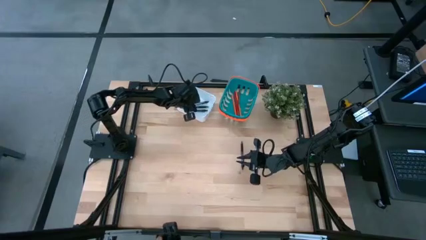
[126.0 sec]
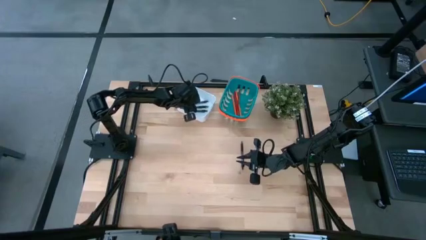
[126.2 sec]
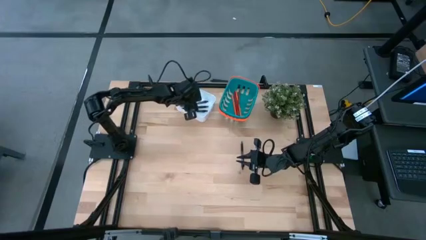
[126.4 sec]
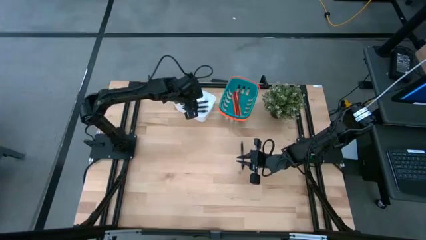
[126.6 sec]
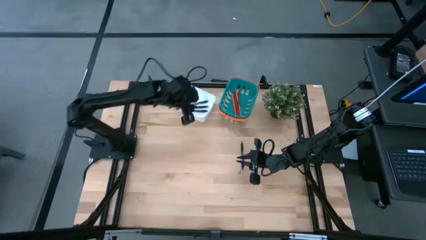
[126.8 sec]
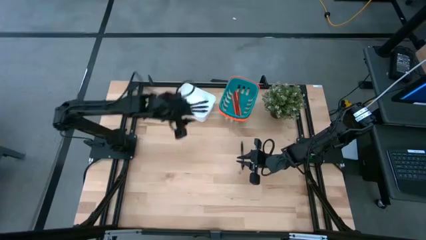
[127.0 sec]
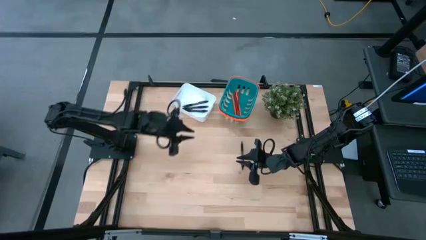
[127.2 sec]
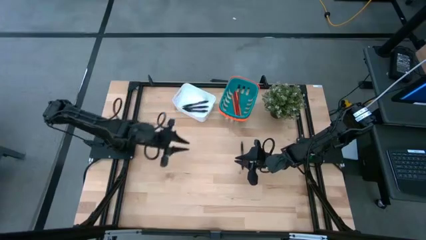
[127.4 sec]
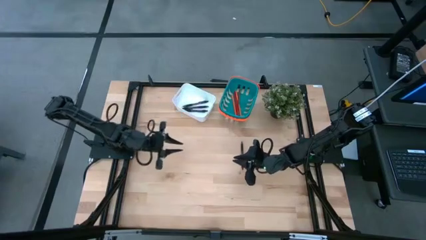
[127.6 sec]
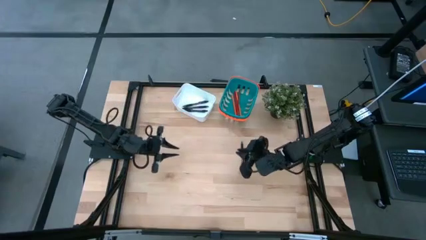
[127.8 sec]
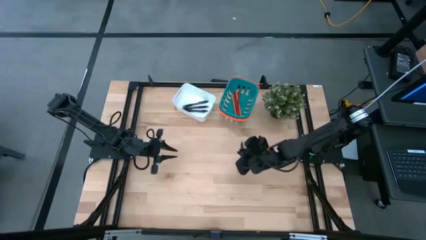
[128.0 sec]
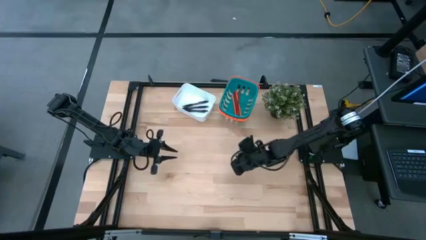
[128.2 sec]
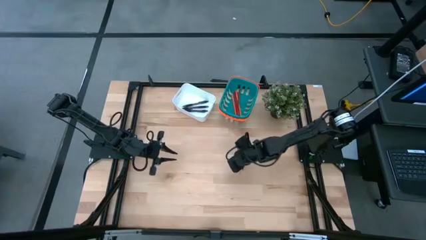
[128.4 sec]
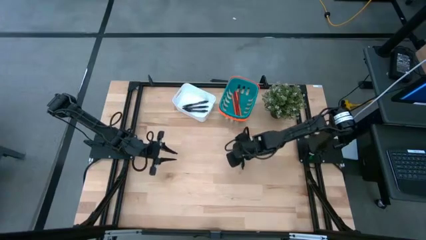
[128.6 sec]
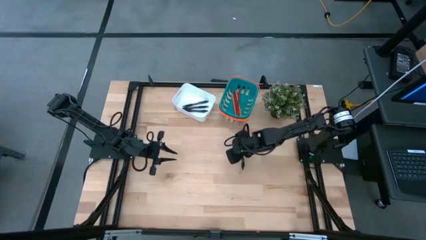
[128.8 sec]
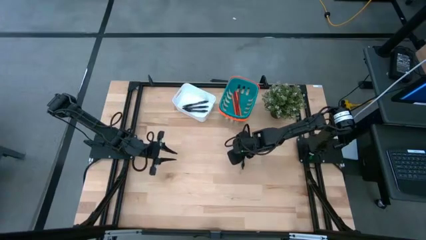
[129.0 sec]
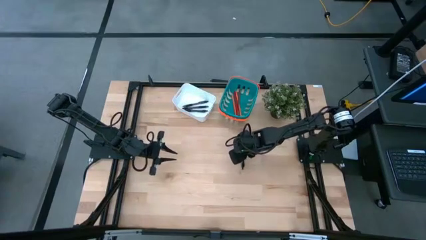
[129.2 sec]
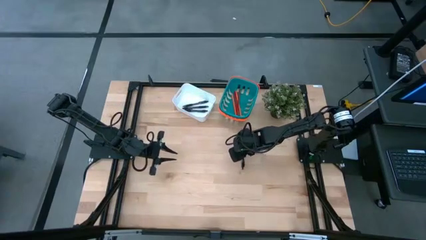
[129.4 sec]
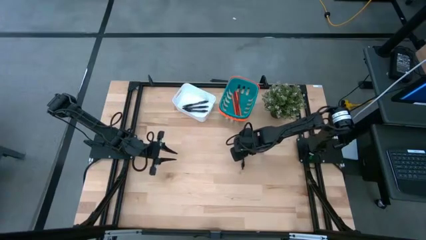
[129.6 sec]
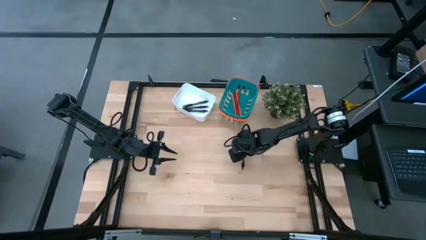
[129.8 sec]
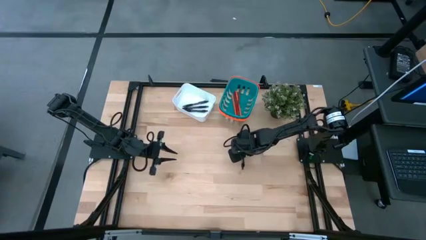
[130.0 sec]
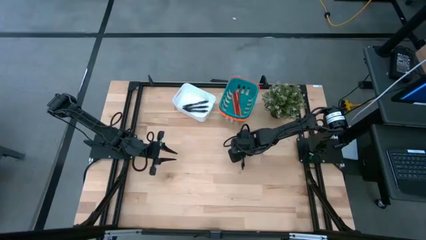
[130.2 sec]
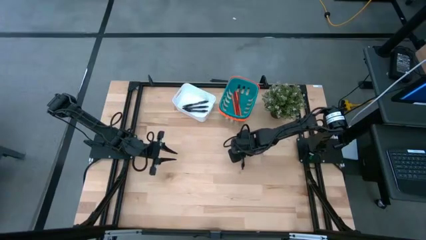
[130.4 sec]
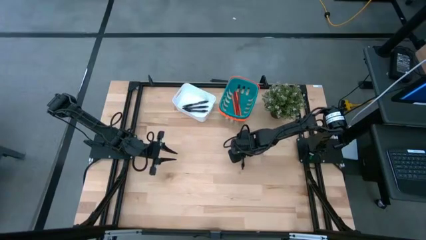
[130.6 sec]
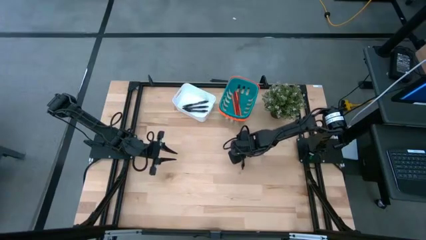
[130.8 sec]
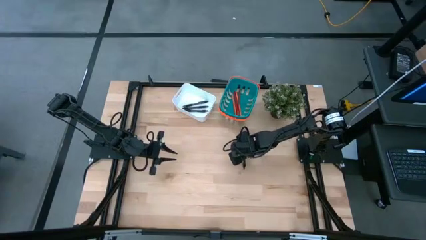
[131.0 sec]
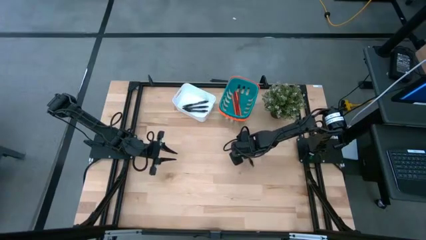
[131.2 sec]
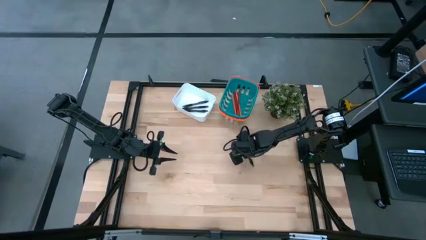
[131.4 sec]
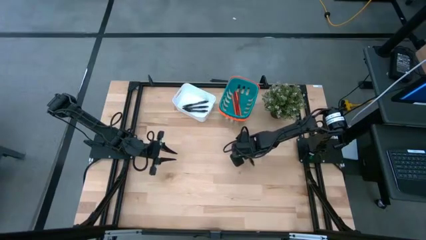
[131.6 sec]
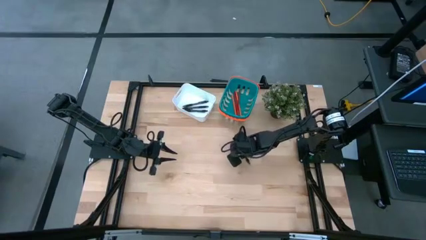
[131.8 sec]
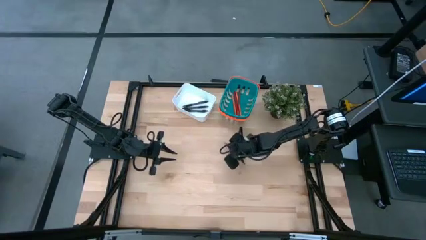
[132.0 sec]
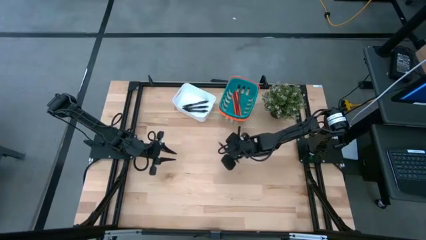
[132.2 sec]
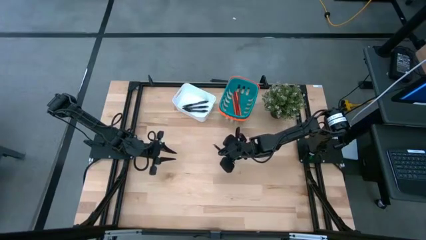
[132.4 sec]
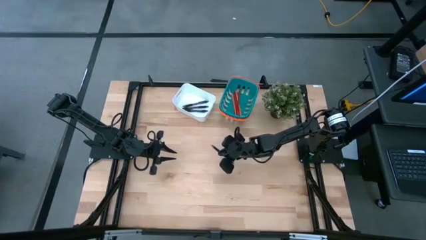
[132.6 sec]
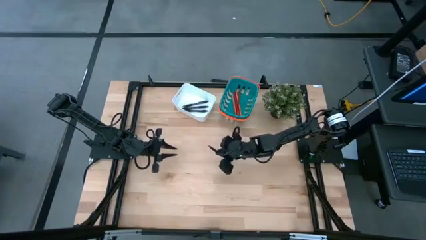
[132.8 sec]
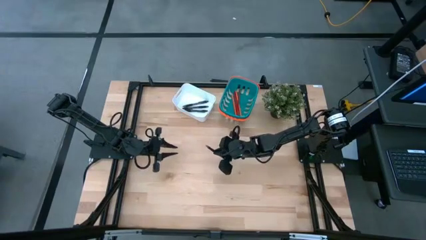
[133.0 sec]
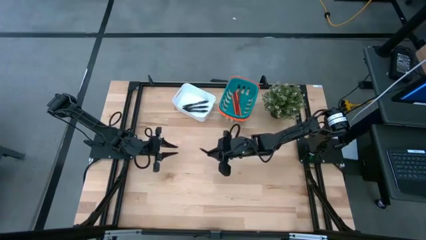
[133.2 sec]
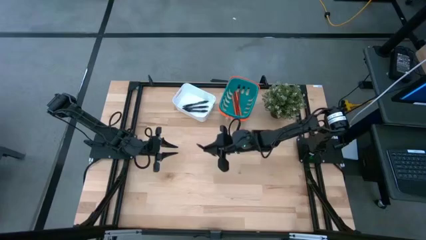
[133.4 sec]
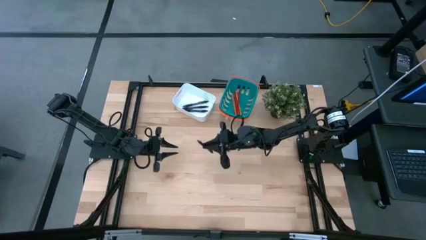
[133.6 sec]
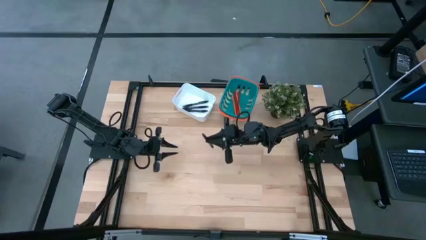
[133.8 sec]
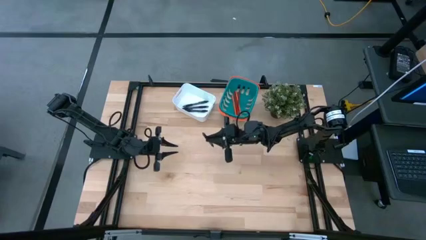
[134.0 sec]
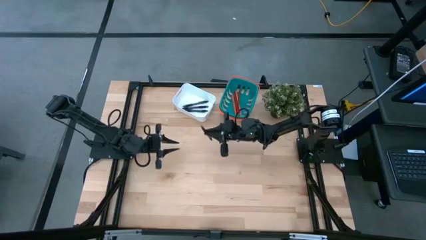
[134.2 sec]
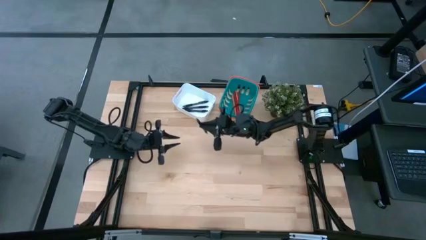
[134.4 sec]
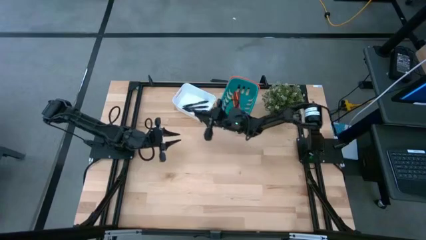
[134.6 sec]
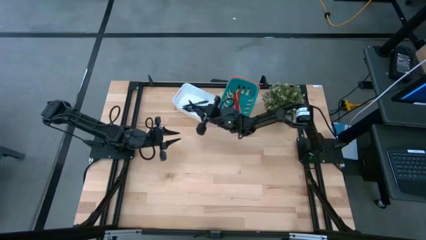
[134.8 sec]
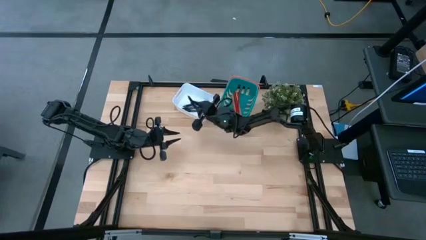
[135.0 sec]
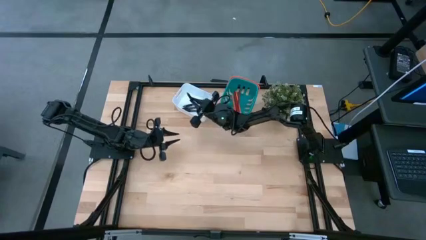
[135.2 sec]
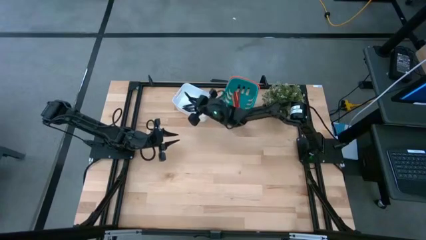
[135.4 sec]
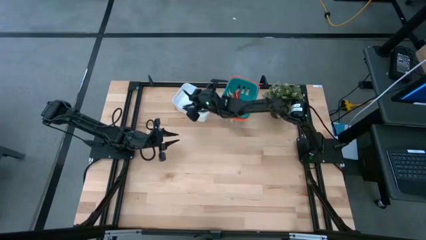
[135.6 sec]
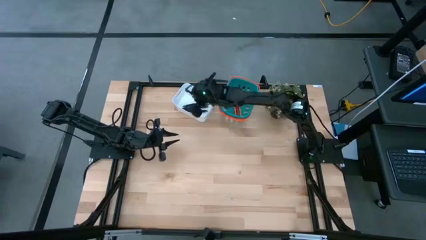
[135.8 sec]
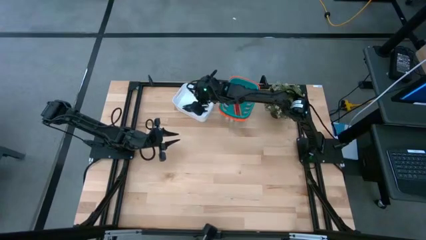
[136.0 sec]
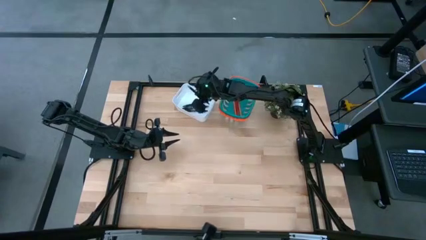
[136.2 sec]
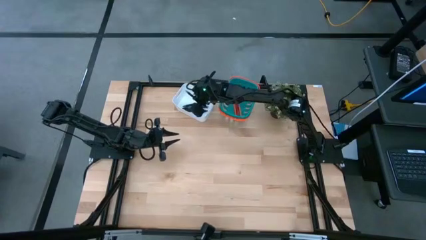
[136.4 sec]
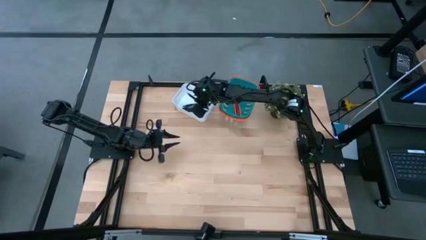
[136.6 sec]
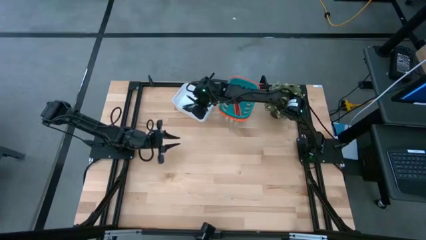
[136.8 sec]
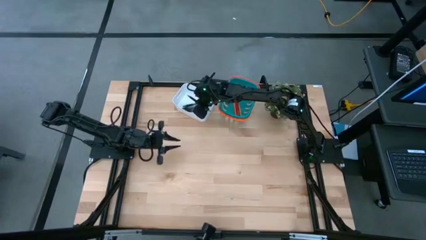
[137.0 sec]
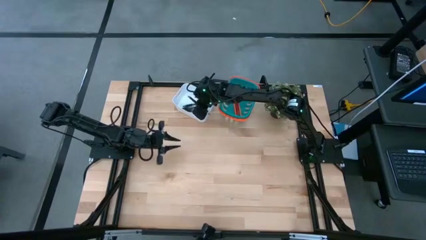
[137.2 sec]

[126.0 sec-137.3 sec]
Task: Sort pens & pencils
Put the black pen into the white bin

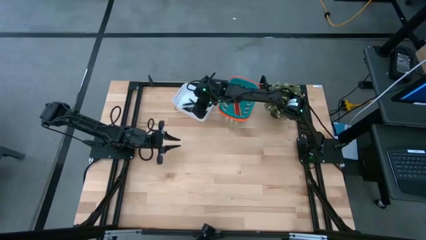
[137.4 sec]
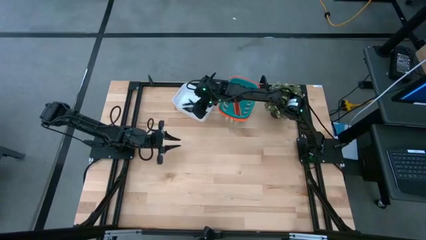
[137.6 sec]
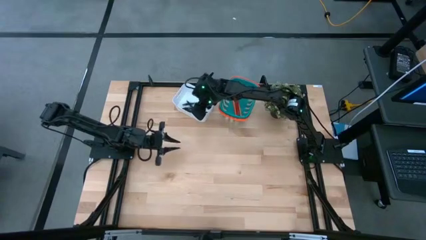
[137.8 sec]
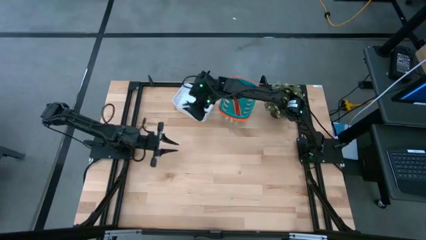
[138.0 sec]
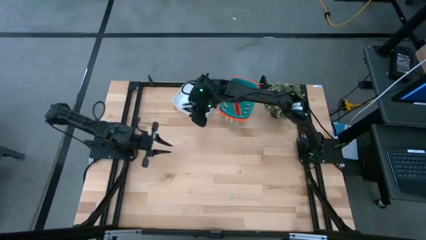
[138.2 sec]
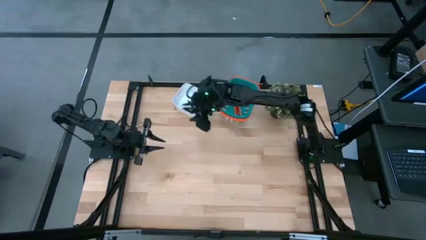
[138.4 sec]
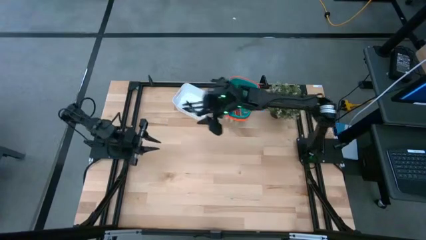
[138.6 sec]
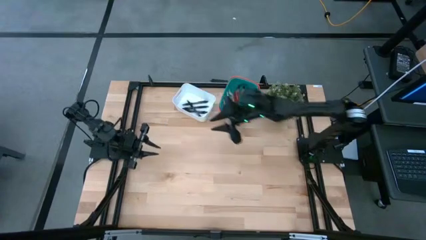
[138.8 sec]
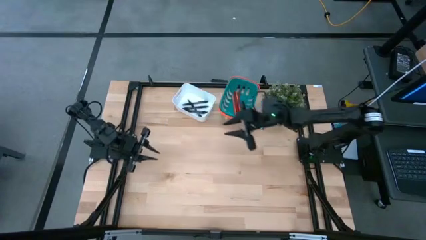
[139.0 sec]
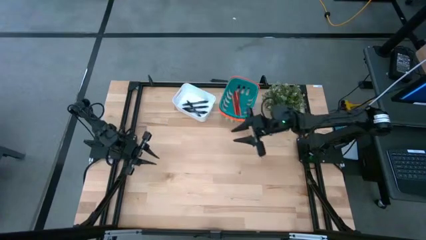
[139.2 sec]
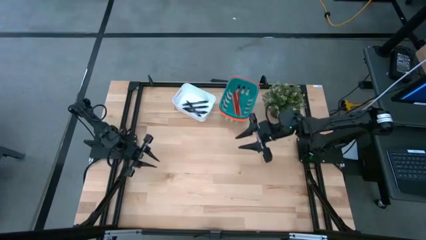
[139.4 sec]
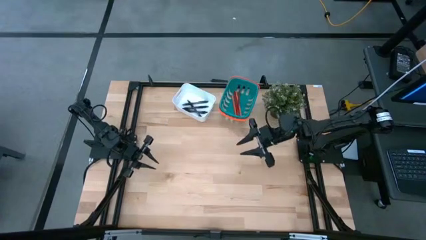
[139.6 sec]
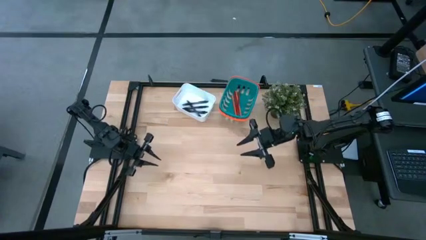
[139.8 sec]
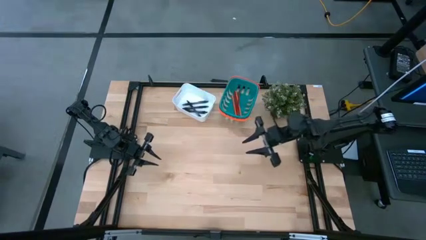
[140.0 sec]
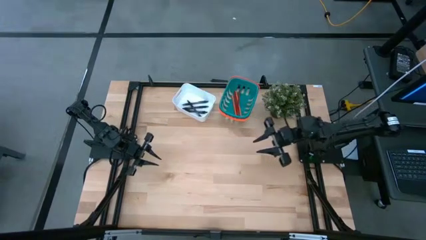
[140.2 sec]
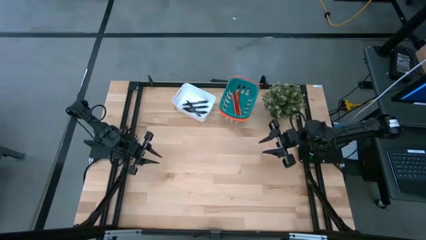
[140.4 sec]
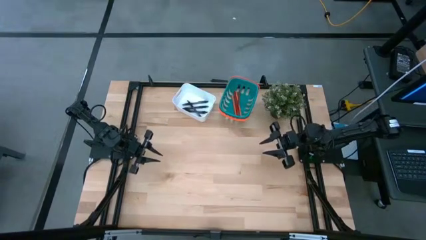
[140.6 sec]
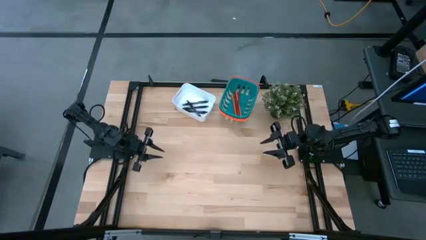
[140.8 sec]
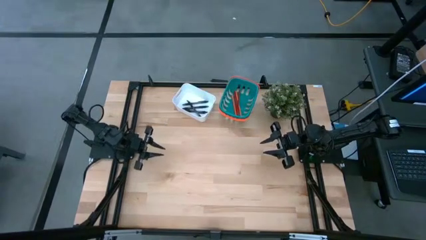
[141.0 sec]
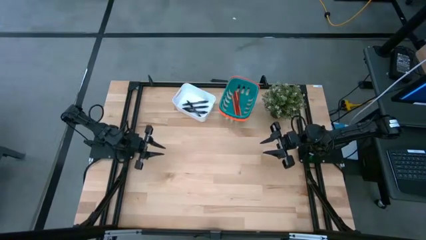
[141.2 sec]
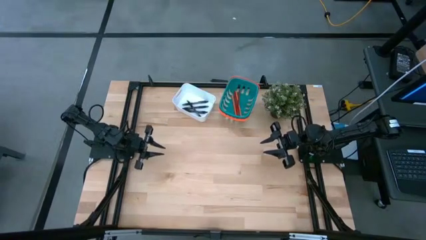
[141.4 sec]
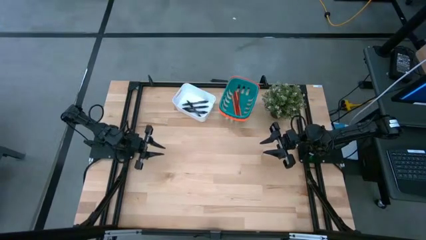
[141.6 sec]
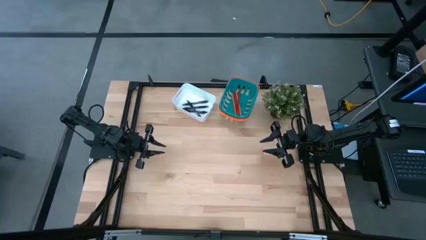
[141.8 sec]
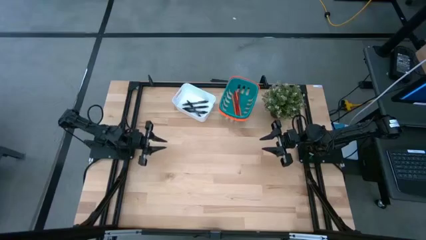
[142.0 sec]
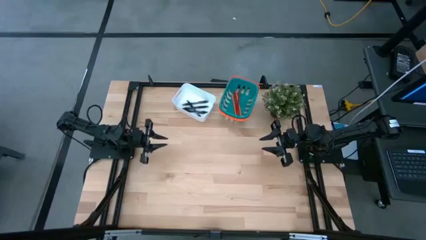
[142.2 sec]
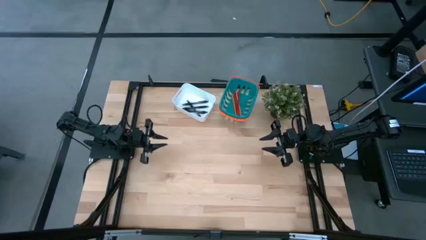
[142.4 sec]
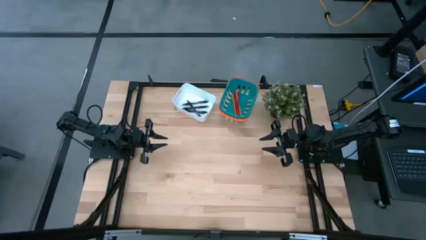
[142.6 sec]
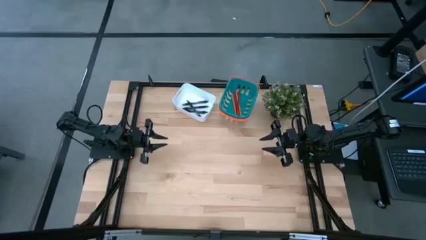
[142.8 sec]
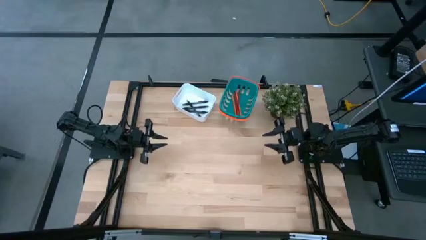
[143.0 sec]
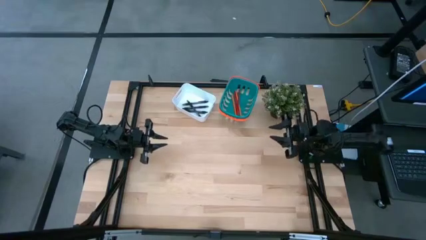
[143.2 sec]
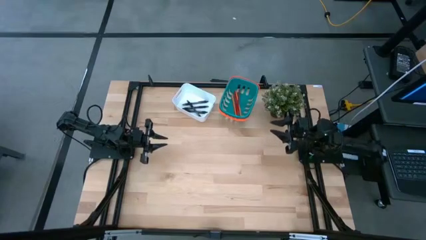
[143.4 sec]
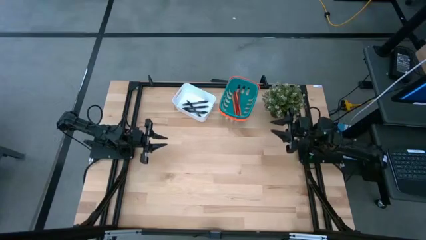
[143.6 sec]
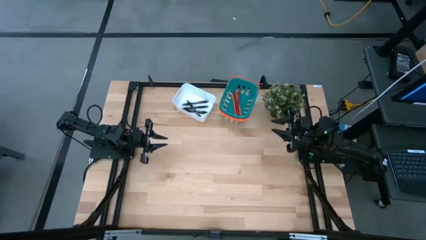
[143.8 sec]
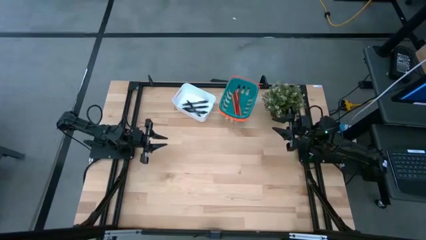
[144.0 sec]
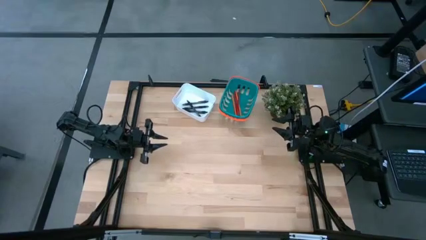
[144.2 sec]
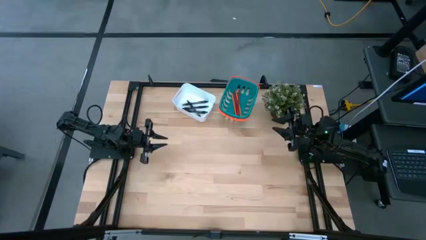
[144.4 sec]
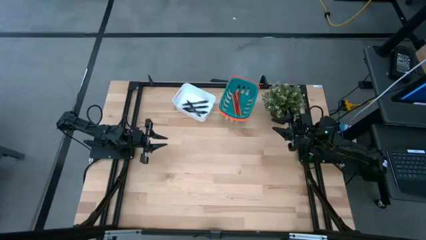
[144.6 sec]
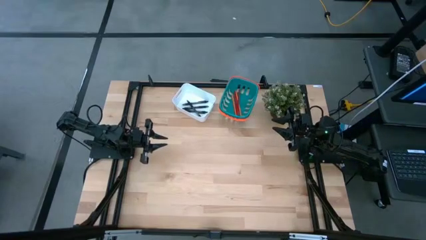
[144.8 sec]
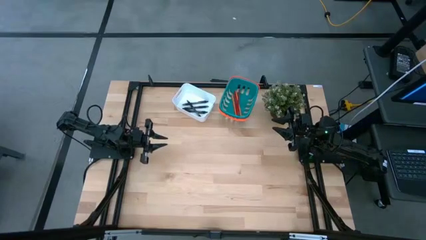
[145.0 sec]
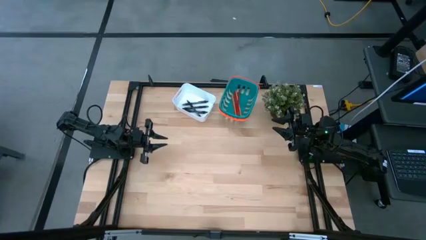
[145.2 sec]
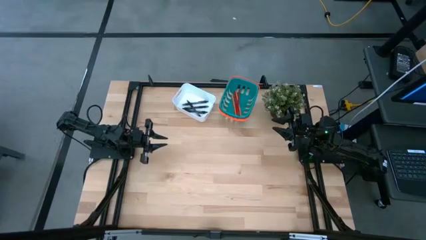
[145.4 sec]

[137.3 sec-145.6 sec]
Return to Home Position
